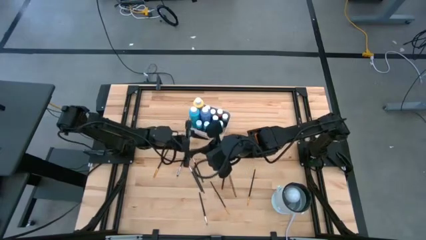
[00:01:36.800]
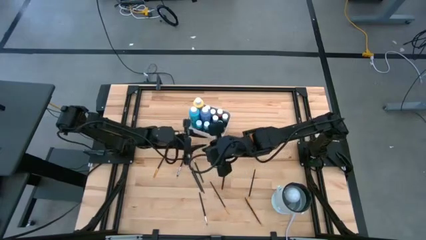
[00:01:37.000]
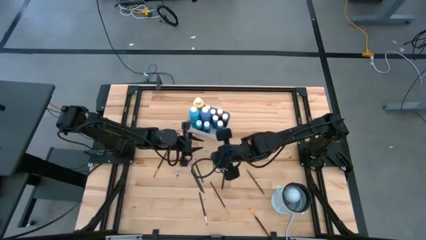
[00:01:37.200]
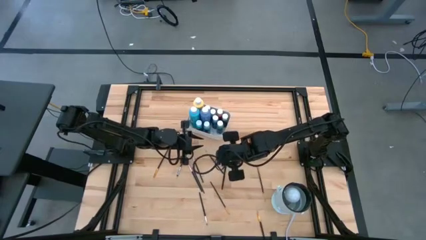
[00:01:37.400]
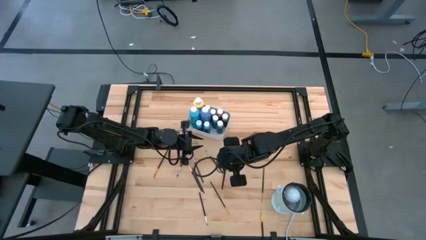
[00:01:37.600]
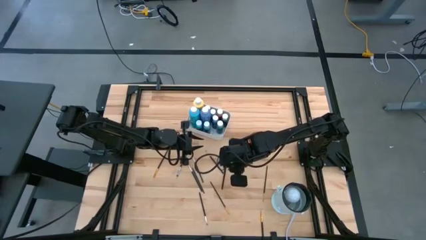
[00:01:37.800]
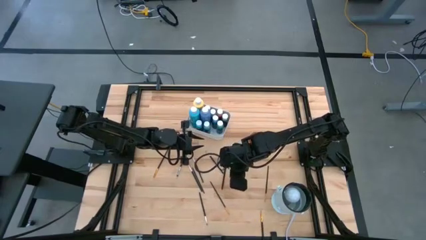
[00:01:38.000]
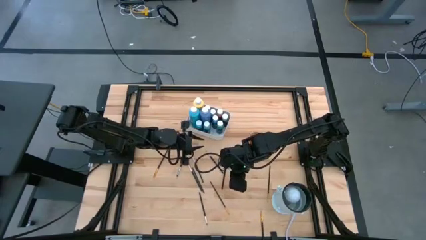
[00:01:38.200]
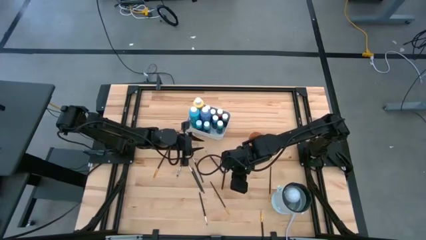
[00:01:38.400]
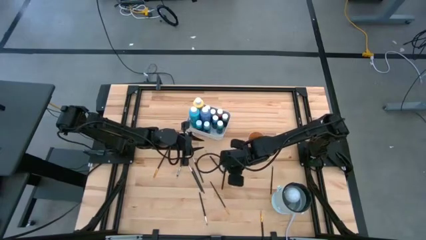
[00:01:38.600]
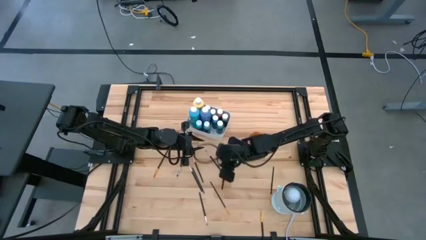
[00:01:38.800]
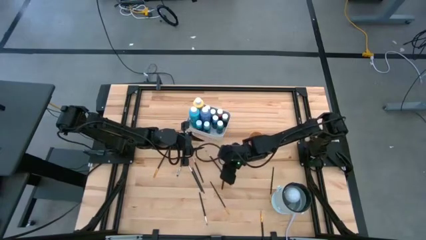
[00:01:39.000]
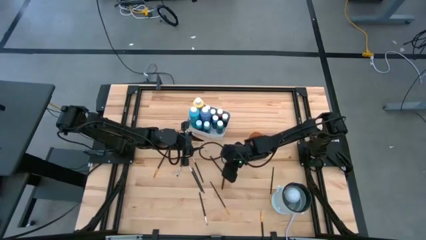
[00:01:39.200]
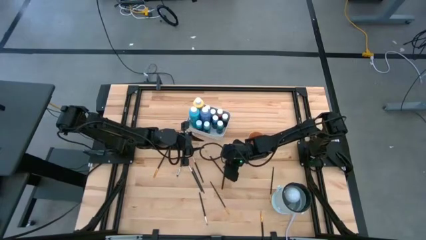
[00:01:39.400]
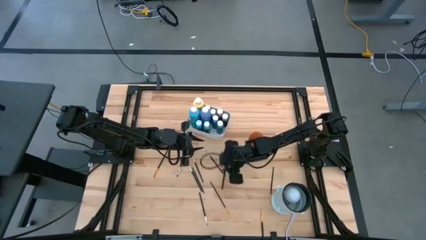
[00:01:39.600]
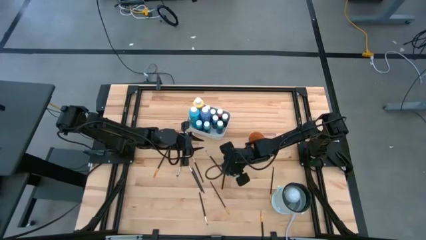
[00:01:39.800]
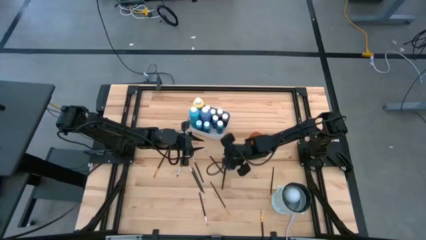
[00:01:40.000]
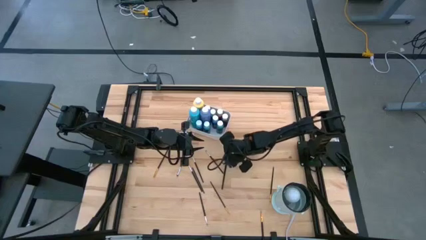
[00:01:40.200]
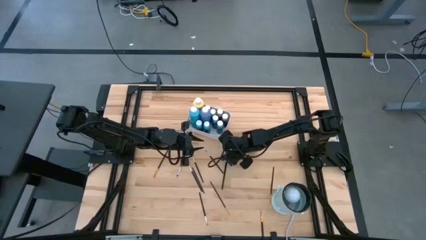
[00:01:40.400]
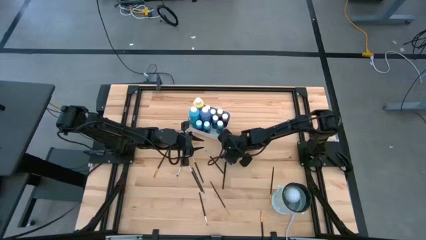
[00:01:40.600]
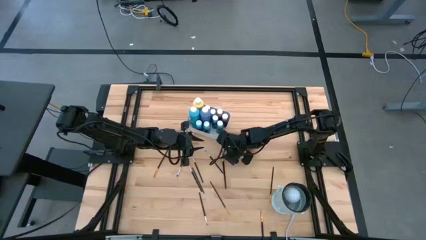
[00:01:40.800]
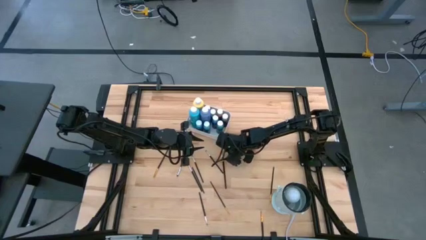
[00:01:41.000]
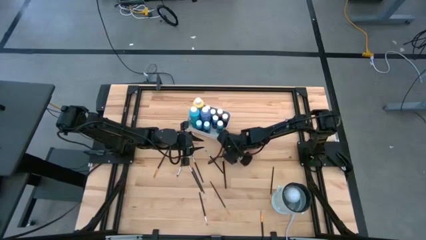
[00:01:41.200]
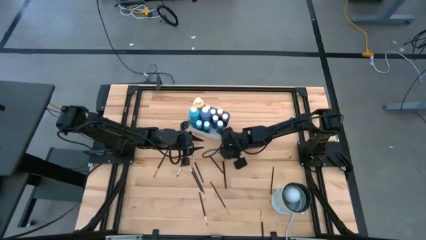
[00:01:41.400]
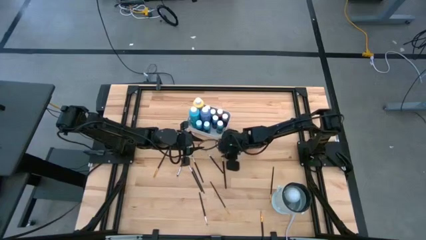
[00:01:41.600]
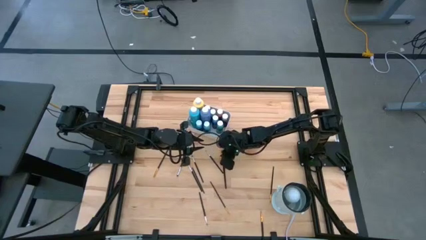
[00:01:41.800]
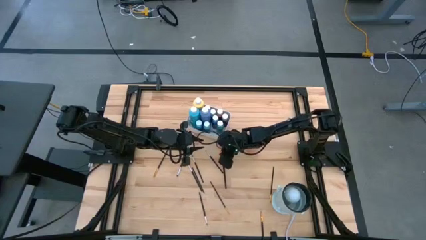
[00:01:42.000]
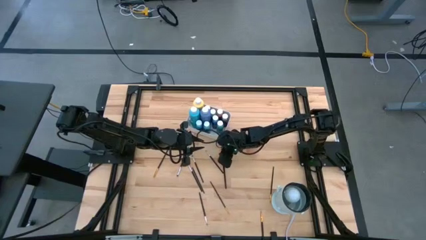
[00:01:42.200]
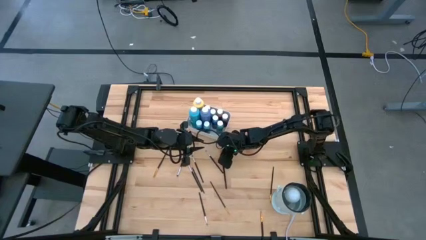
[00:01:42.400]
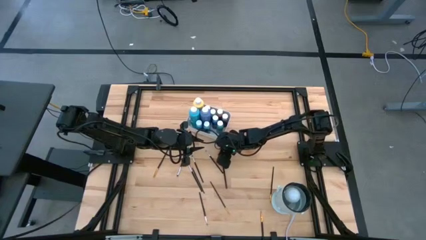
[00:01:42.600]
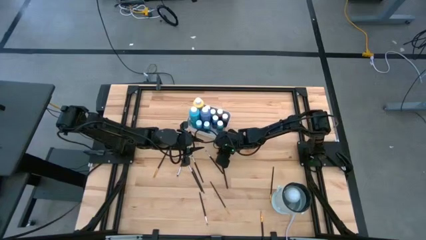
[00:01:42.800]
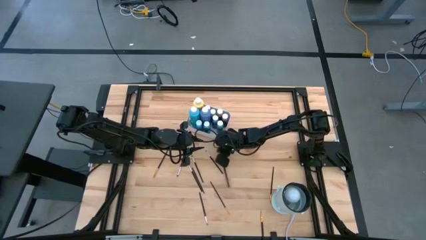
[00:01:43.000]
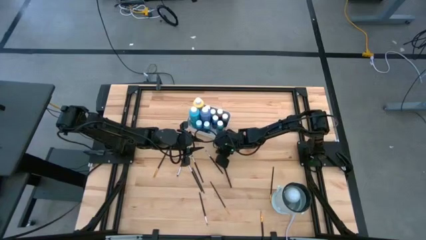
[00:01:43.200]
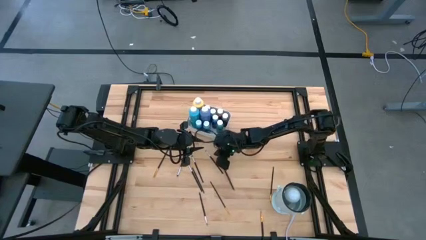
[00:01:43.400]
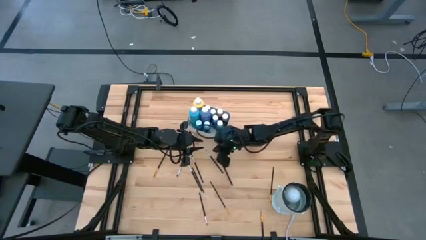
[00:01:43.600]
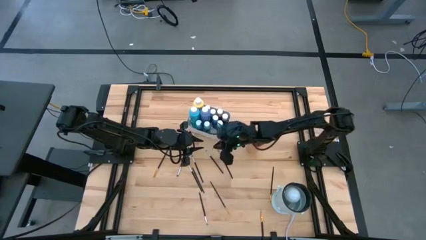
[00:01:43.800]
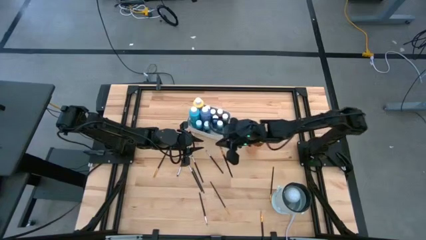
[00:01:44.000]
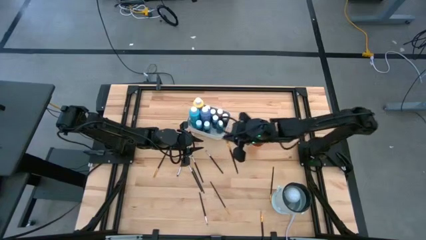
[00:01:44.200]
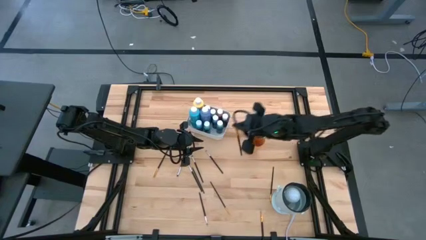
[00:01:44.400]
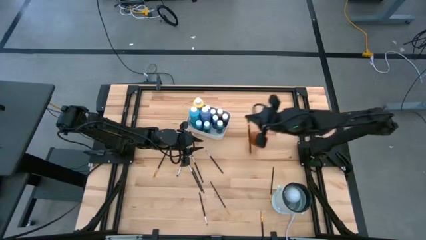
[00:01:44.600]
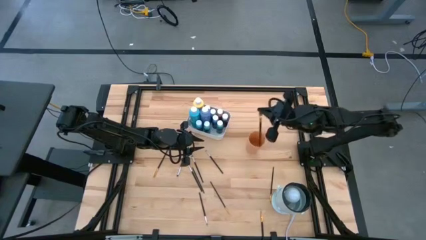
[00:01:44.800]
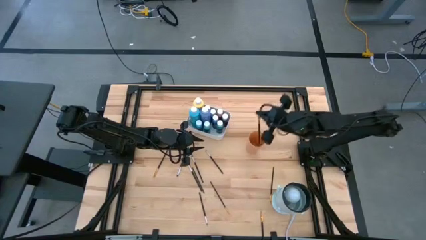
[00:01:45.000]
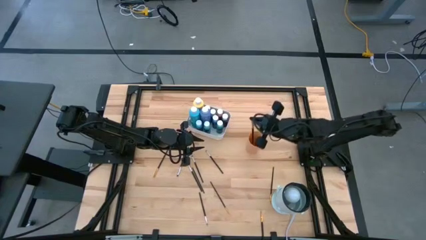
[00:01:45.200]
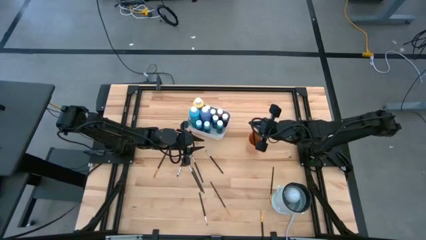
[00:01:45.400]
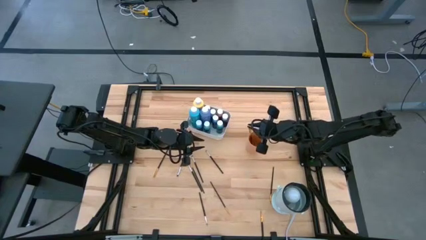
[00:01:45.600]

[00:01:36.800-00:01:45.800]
Task: Pick & Place Paint Supplies
Put the gold paintbrush into the cup

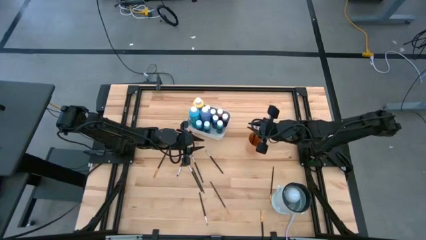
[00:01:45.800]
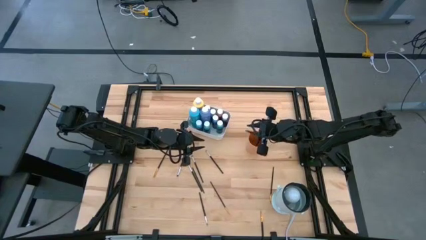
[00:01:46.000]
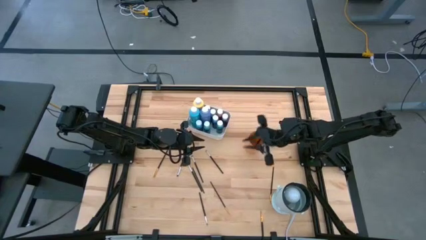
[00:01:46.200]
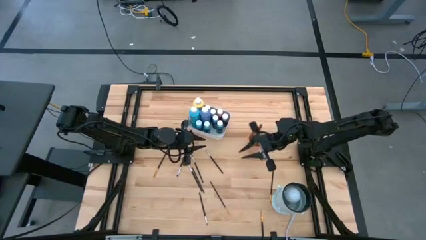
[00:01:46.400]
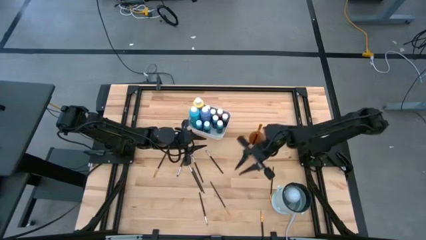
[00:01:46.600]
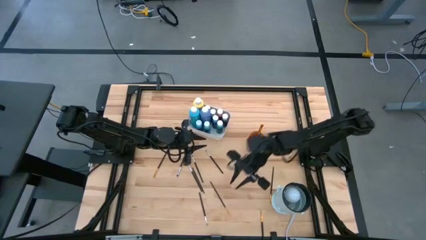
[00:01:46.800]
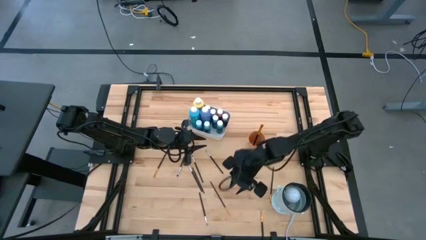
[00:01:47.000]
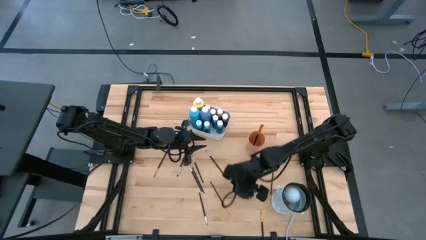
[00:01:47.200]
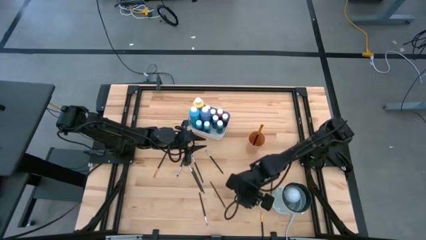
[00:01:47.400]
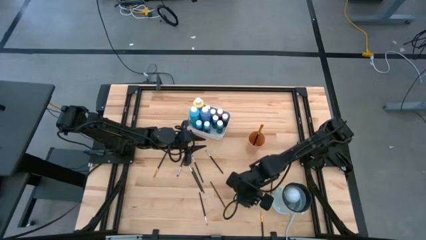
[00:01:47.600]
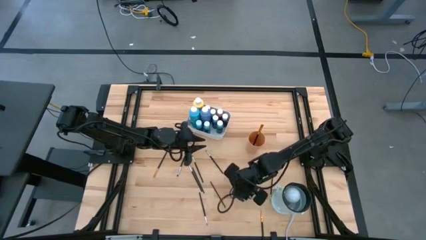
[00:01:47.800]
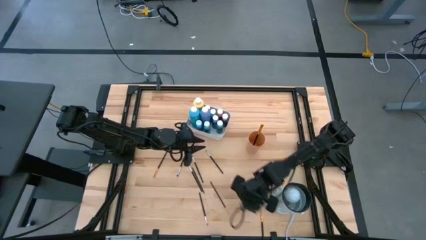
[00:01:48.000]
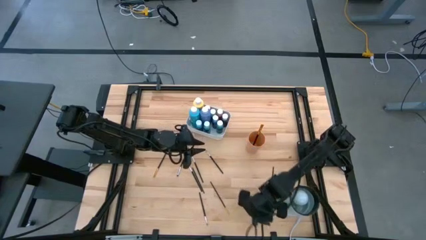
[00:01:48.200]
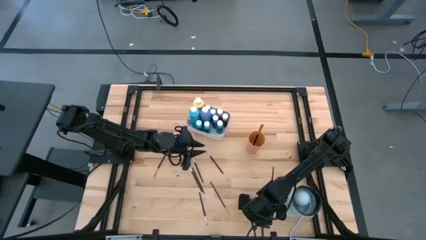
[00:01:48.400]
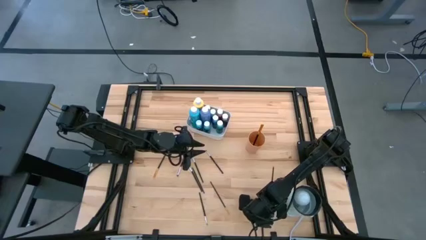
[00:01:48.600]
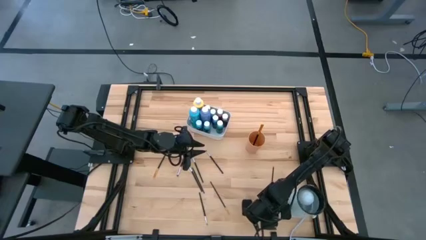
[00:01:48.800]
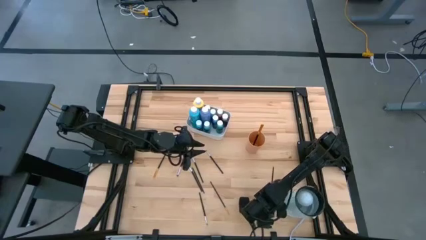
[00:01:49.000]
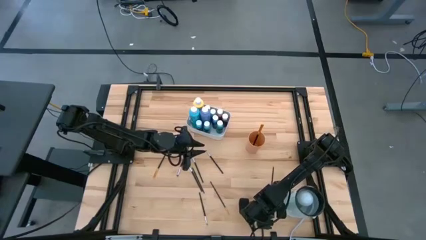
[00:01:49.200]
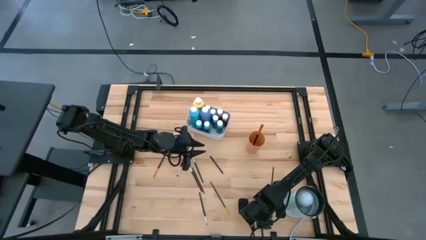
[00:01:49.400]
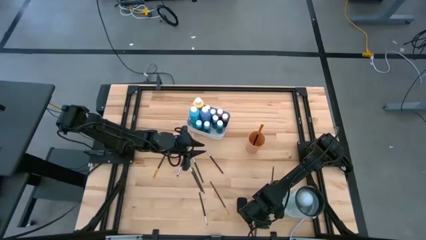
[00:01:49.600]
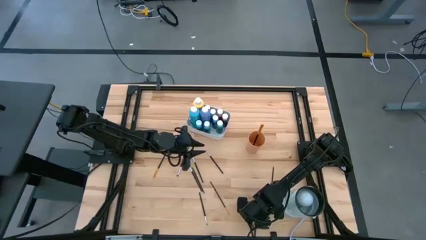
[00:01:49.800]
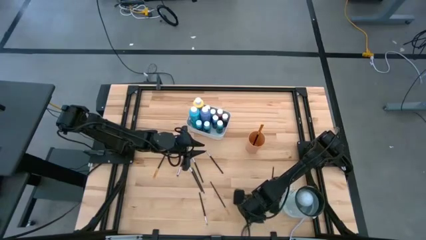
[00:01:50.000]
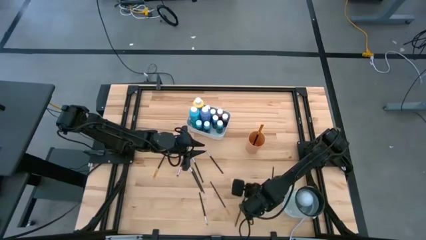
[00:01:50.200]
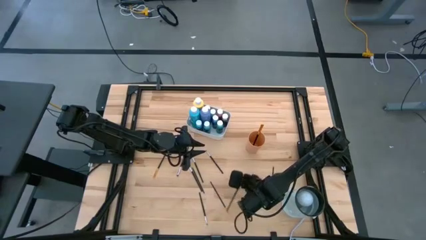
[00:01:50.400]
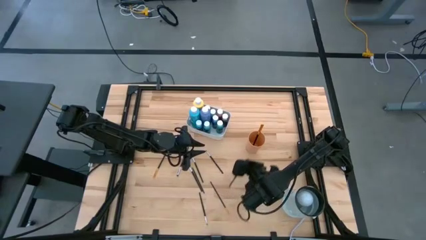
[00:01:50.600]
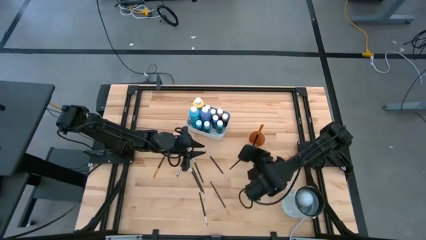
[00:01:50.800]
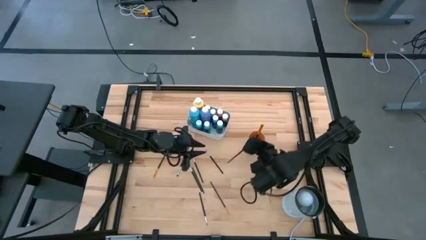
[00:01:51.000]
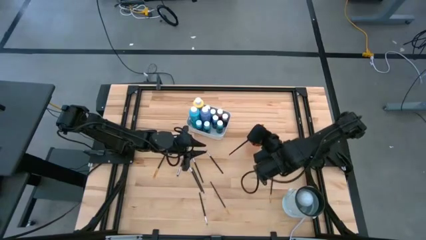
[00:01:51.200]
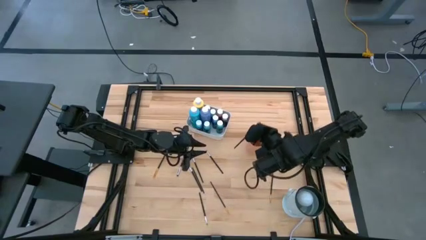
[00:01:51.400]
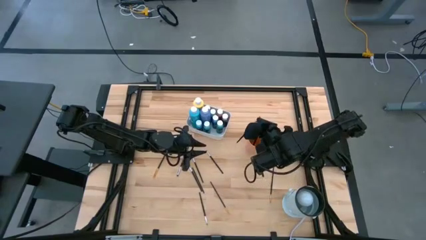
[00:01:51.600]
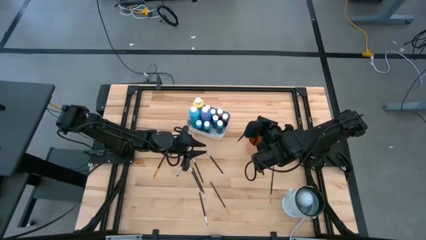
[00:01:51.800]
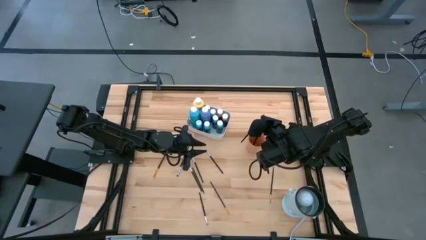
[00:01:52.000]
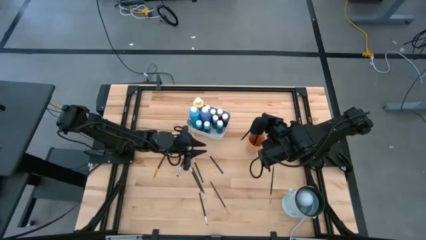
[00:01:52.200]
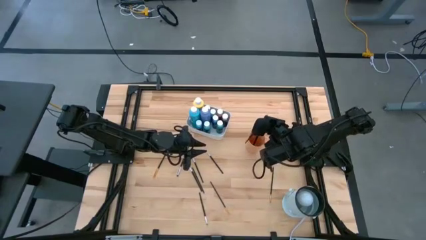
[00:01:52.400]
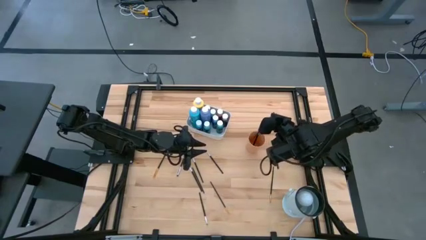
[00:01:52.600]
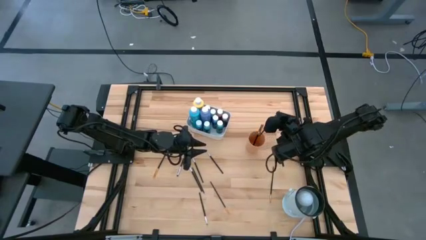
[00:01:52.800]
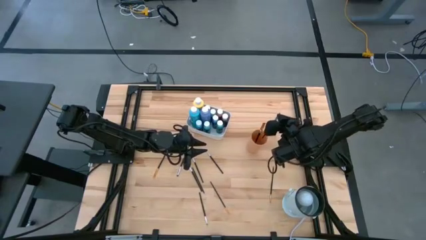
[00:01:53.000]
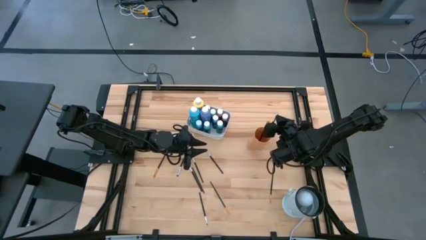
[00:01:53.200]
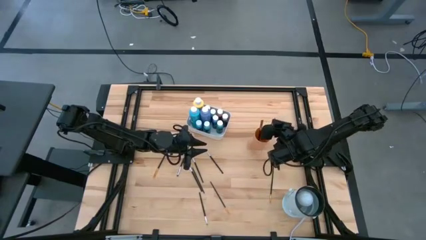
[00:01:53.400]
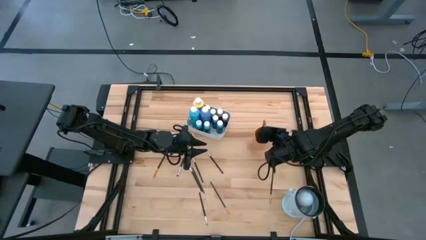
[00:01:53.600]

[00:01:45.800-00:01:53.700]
Put the gold paintbrush into the cup
